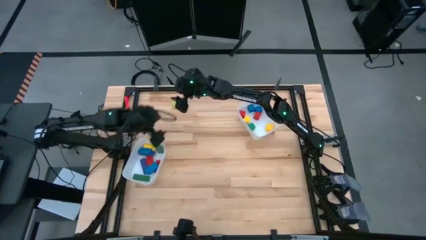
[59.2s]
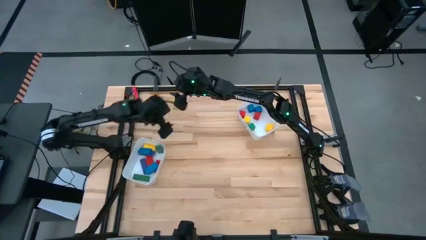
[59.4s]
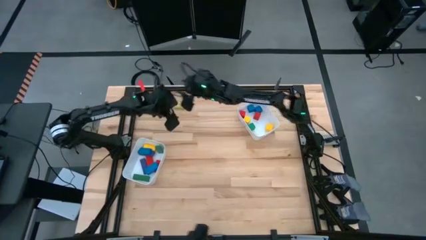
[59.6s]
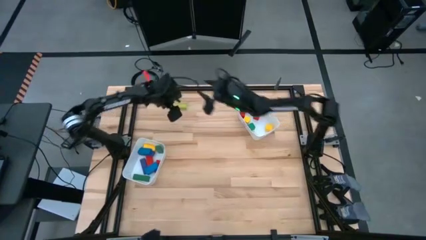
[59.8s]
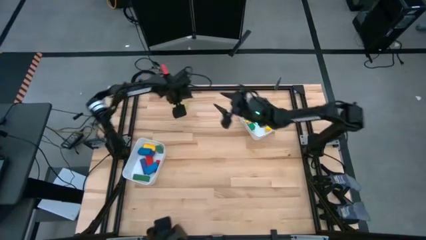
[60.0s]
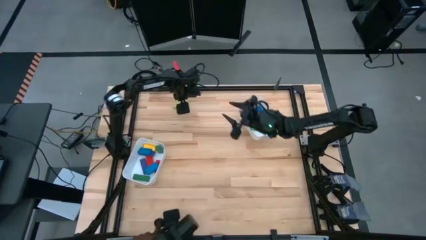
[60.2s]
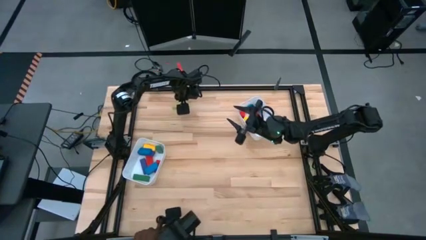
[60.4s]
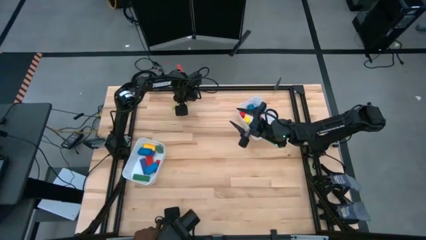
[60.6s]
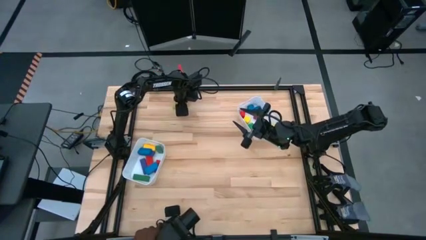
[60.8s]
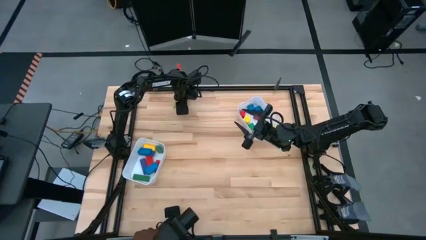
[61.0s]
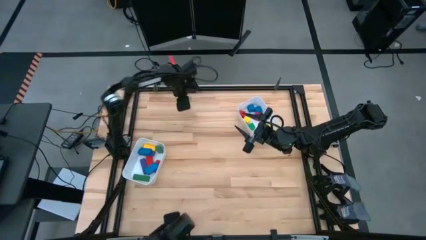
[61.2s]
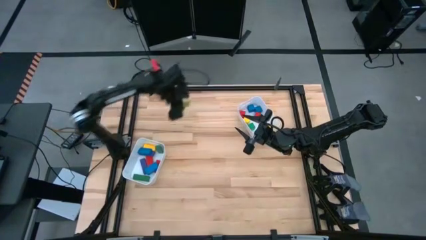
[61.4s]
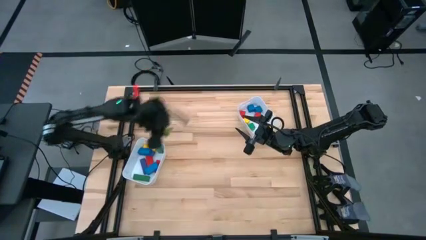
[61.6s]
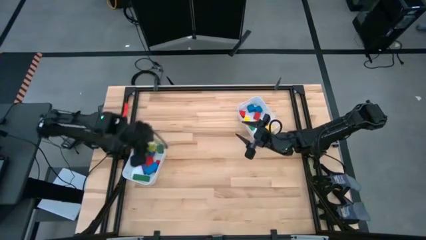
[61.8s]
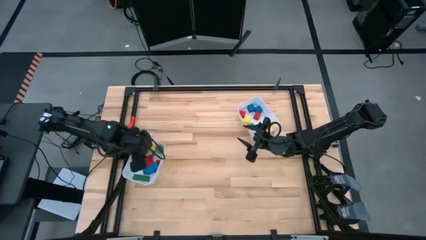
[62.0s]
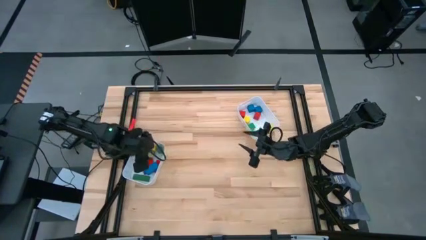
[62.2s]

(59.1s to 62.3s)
Task: Sort blocks by size
Put the large light green block into the left white bin

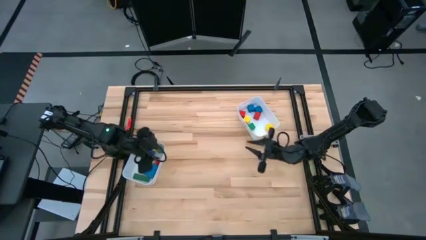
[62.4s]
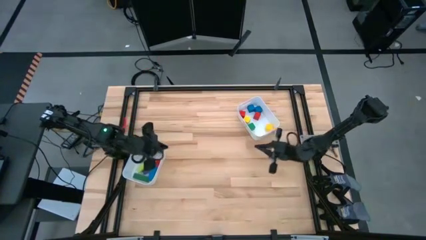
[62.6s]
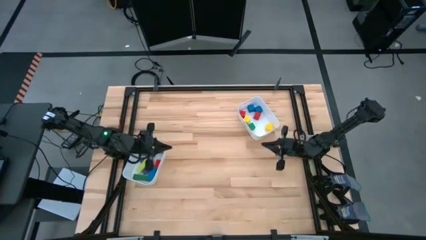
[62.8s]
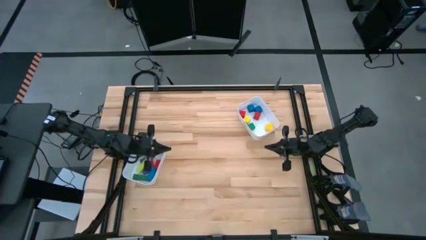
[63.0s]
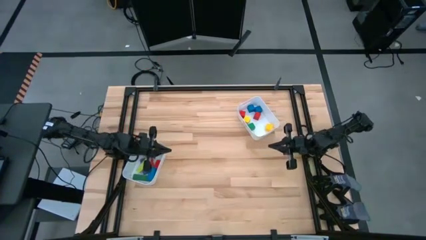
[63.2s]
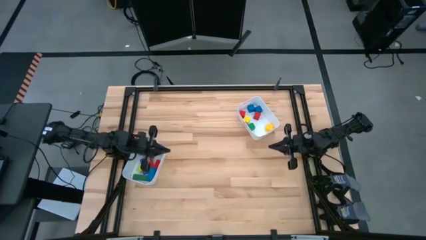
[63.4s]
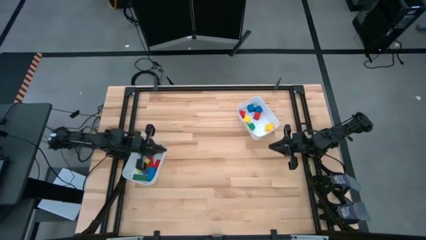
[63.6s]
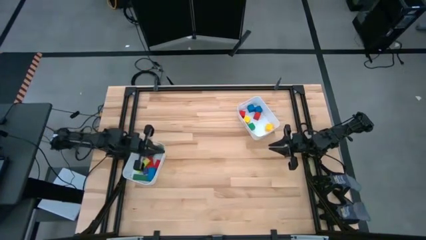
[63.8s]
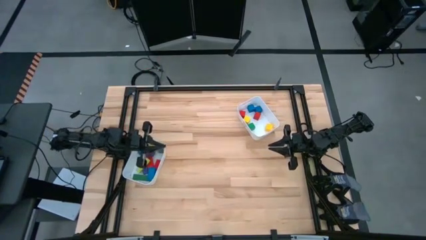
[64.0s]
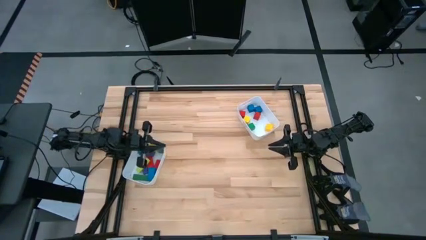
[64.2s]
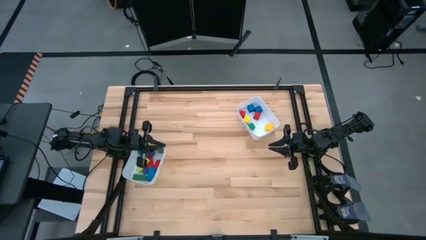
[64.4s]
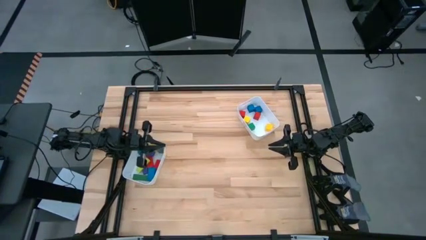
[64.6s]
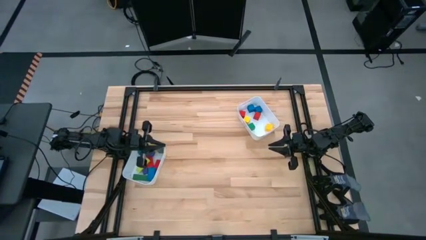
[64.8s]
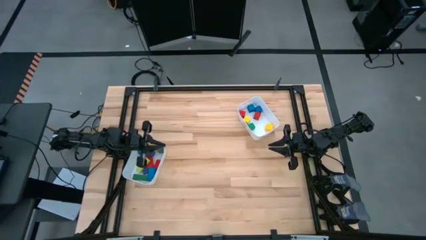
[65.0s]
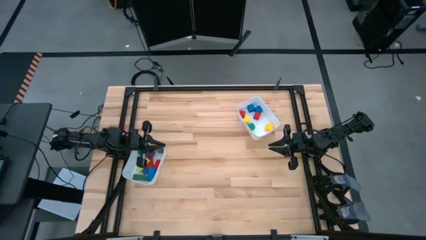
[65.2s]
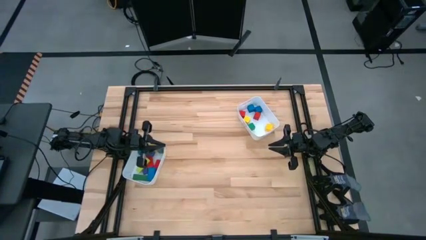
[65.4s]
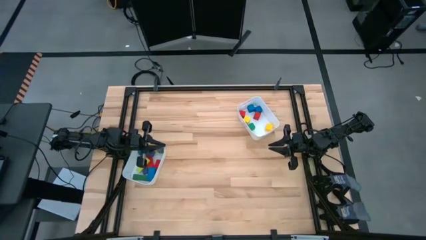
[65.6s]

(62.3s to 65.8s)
Return to Home Position

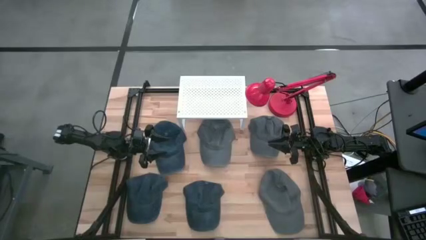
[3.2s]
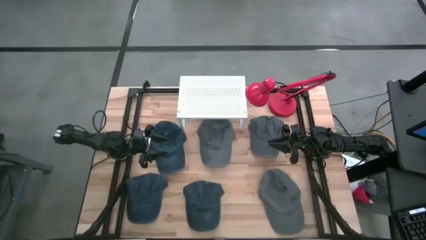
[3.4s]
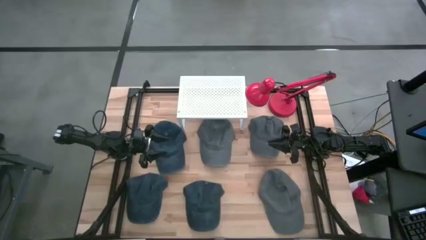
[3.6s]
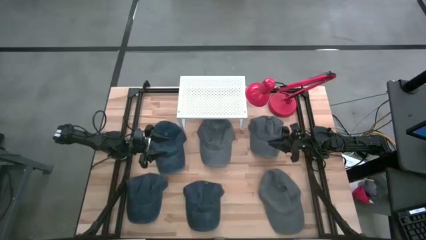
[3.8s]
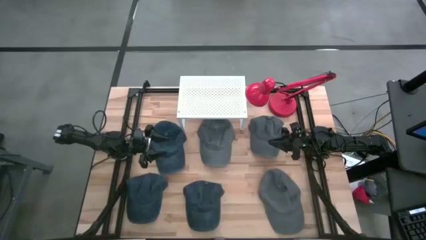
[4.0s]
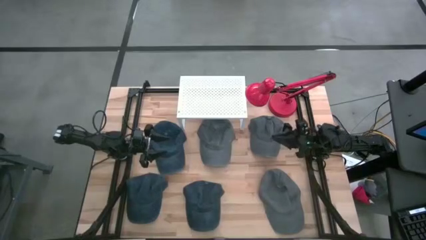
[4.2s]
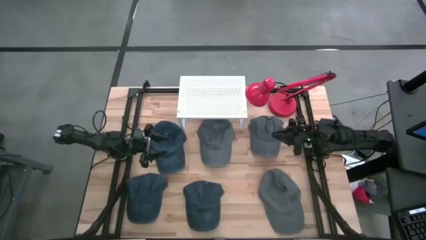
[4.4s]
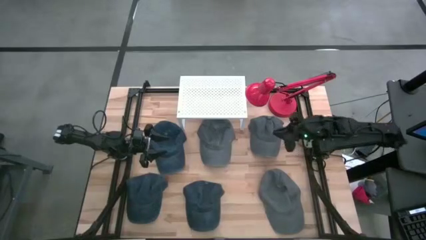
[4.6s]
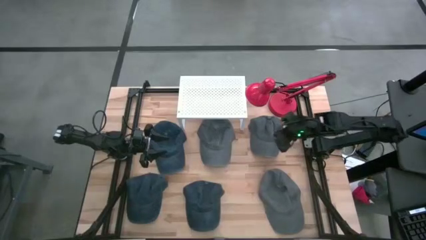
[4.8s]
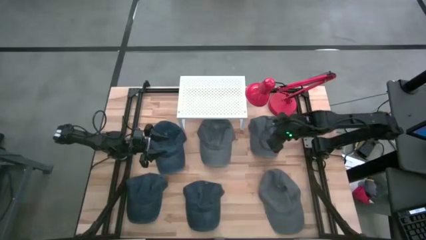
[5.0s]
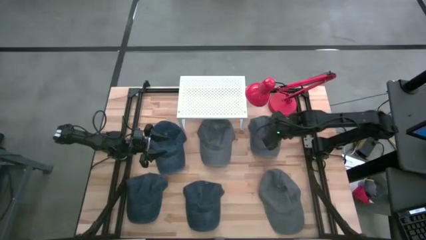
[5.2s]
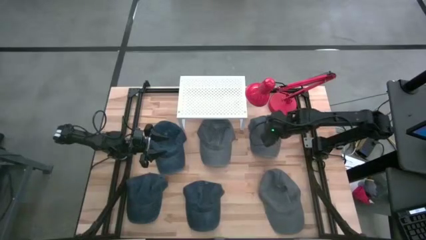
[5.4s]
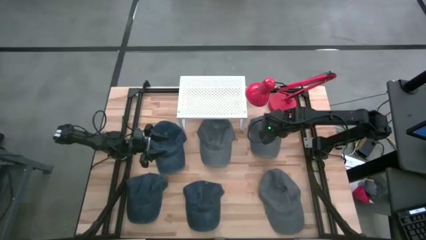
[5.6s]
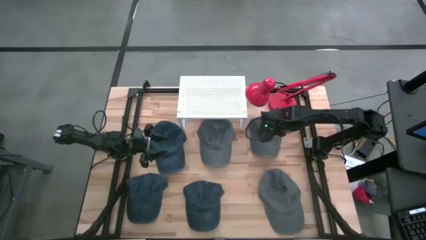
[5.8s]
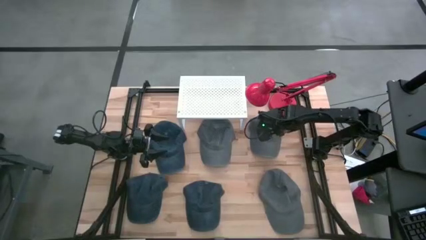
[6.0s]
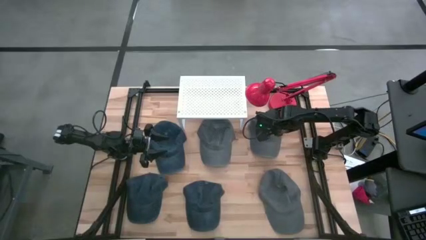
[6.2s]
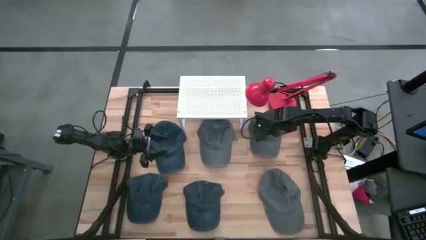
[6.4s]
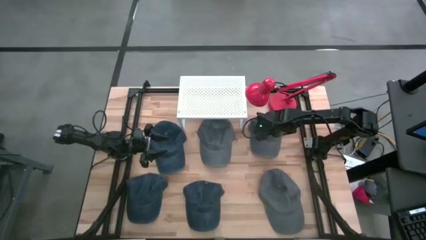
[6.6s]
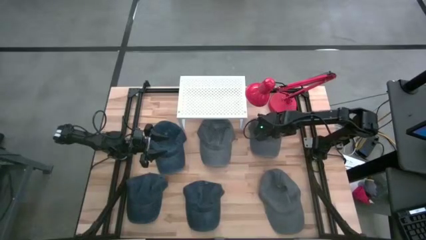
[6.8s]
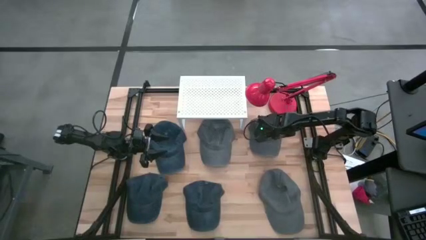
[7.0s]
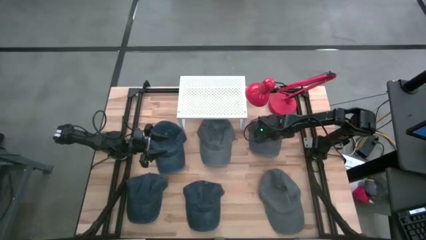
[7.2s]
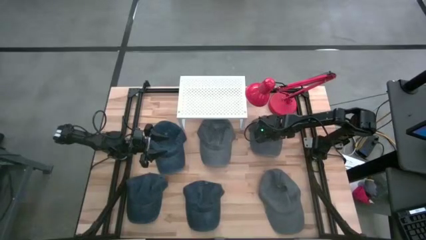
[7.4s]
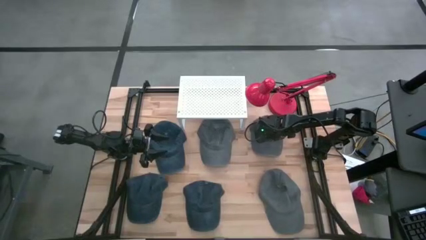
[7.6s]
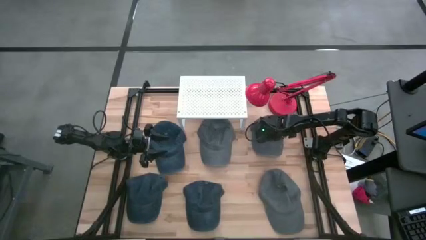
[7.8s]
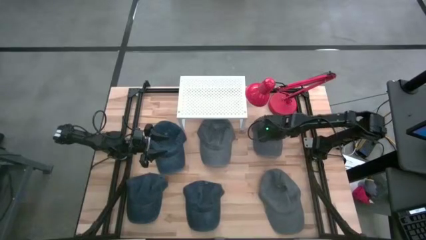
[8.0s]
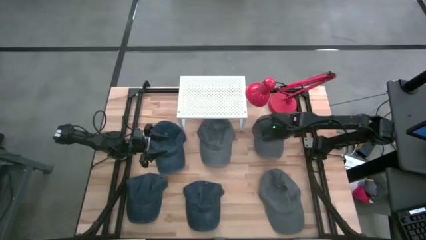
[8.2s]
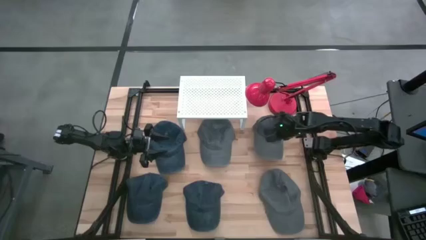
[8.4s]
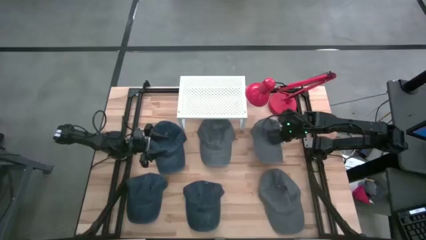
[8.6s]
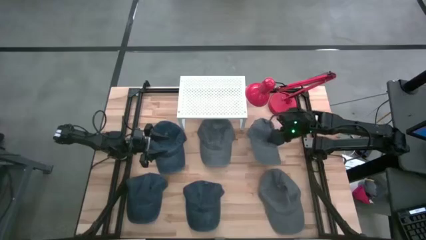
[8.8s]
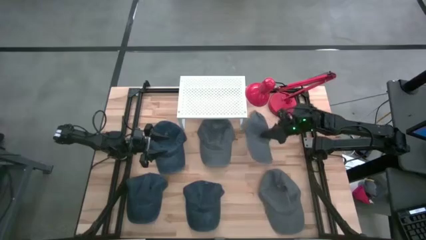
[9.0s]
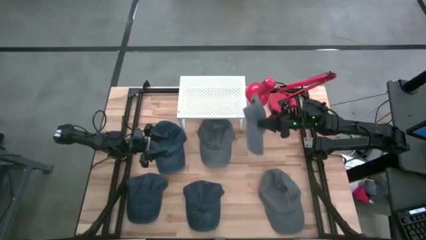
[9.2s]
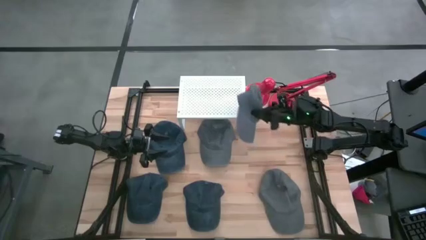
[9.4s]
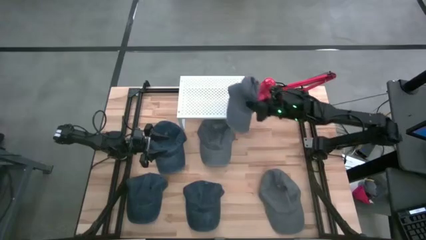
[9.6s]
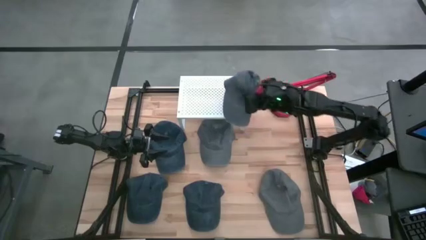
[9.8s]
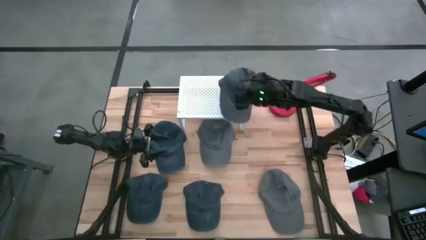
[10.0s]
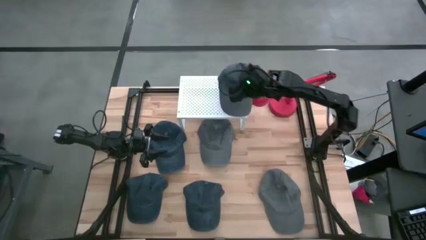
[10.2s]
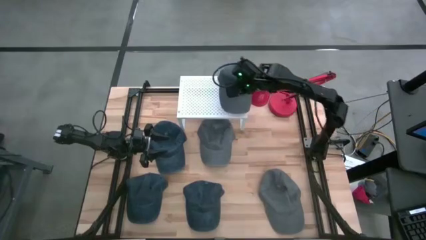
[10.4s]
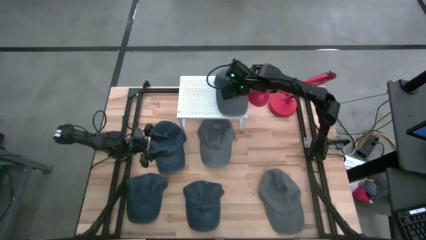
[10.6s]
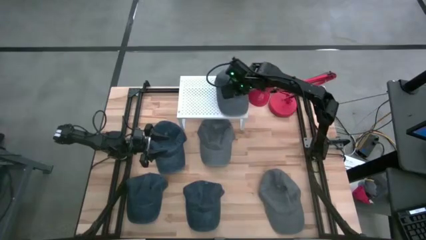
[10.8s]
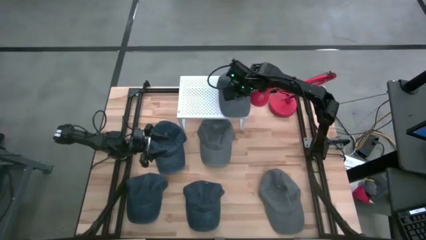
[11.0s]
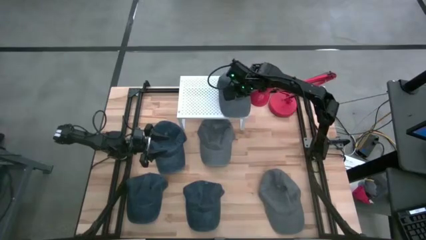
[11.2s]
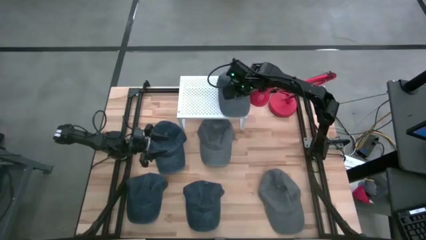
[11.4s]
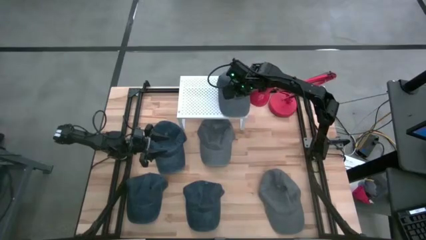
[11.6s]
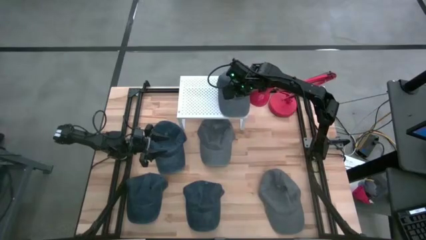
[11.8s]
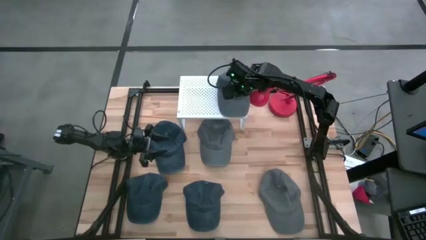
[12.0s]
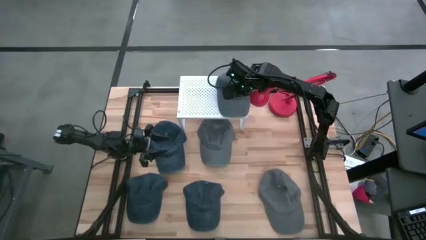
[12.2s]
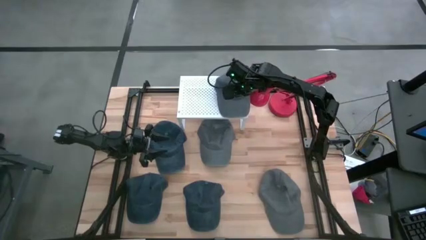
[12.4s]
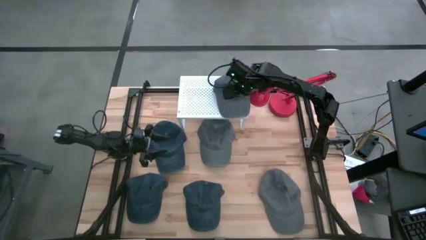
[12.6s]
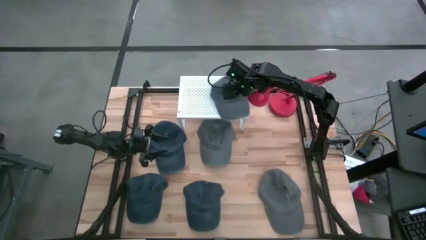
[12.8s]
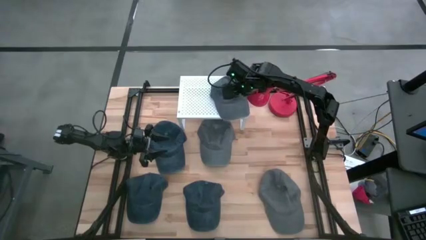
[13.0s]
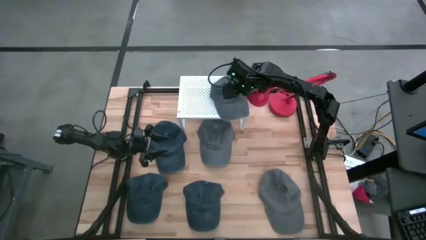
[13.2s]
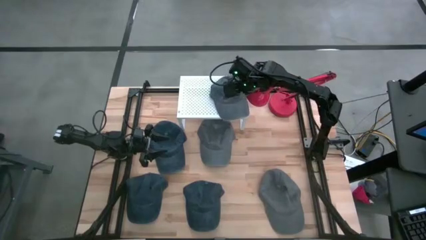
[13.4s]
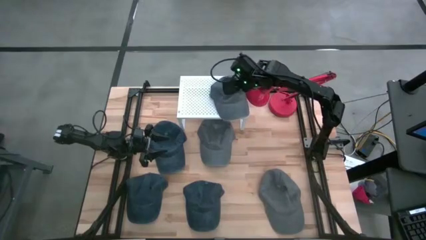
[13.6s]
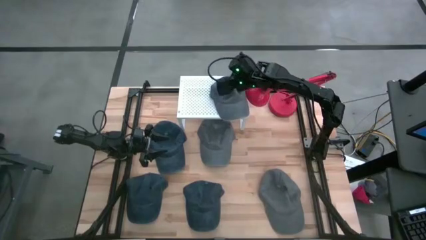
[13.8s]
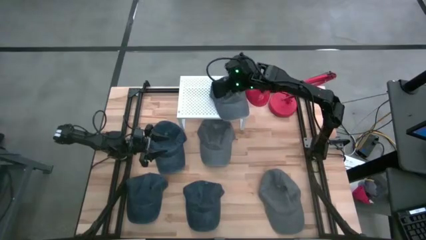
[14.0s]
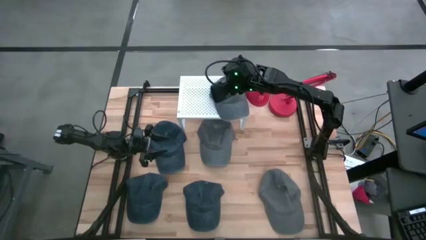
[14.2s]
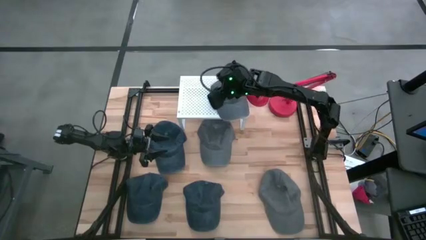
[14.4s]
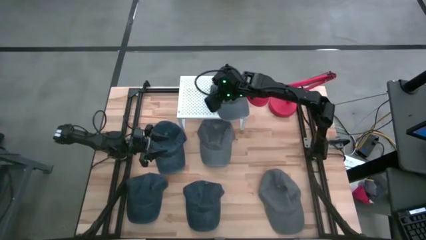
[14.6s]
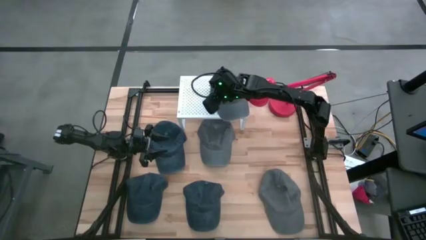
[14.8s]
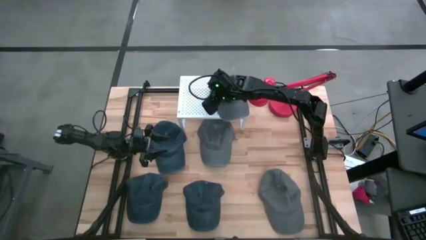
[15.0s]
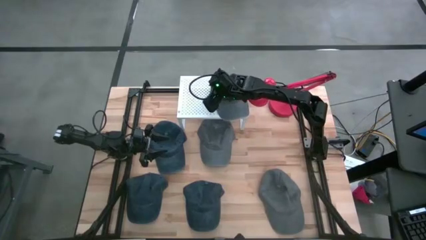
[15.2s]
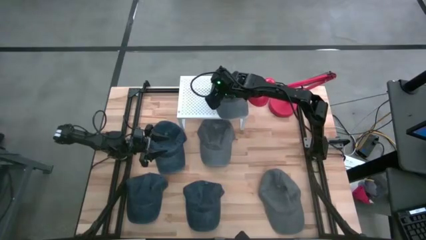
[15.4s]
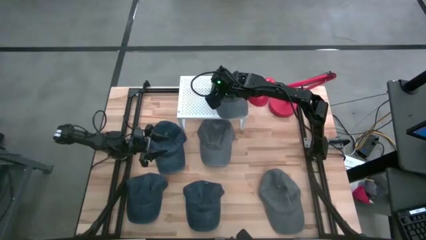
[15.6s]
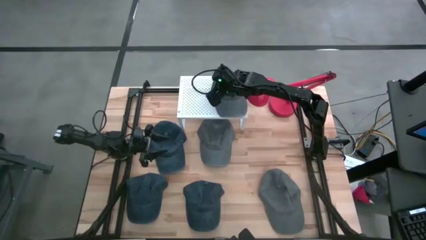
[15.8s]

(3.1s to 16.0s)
Task: Pick & Place hat
Put the top right gray cap on the shelf
